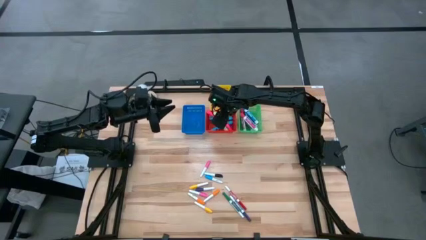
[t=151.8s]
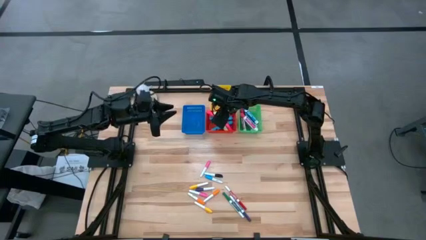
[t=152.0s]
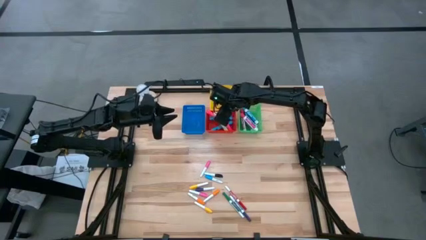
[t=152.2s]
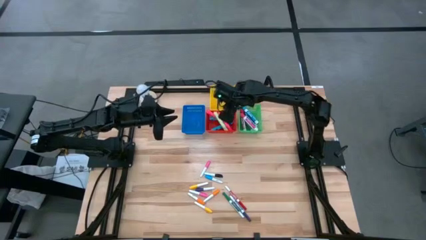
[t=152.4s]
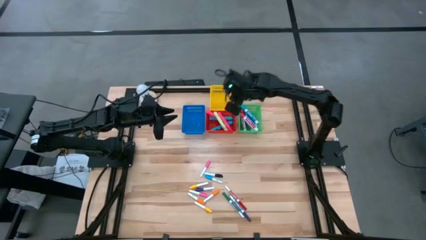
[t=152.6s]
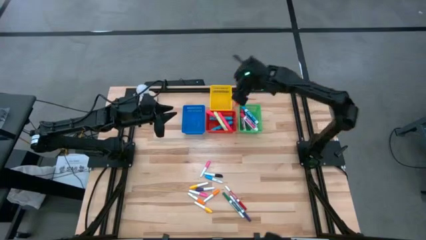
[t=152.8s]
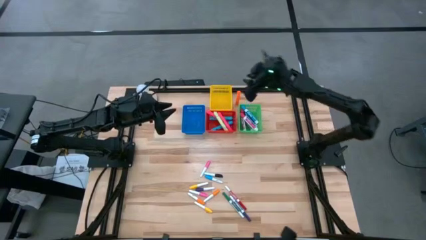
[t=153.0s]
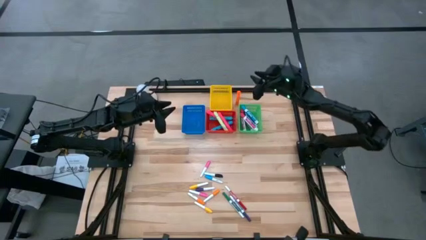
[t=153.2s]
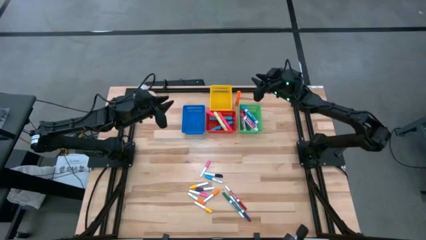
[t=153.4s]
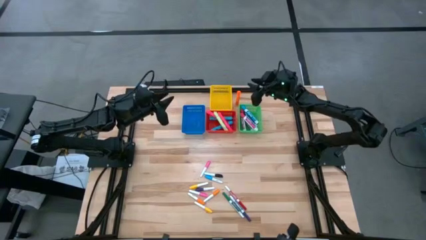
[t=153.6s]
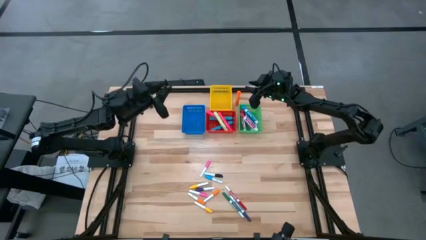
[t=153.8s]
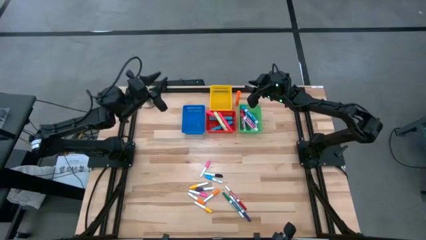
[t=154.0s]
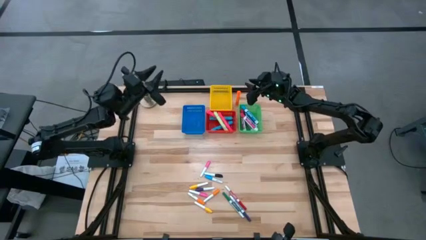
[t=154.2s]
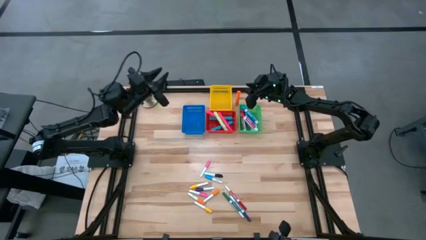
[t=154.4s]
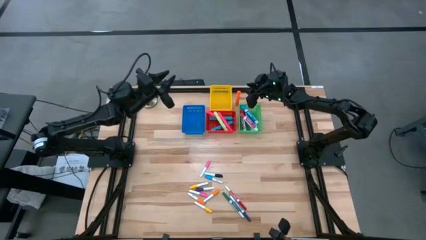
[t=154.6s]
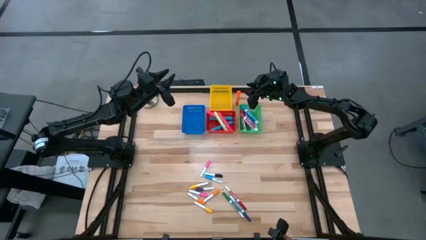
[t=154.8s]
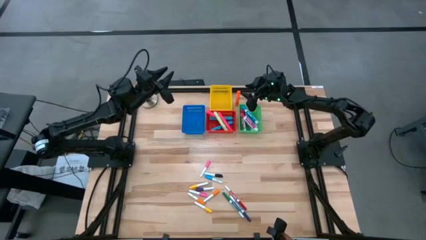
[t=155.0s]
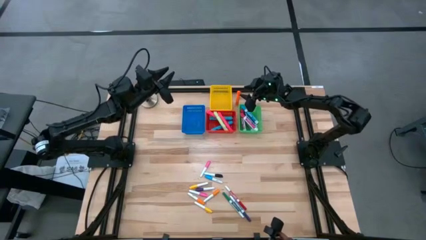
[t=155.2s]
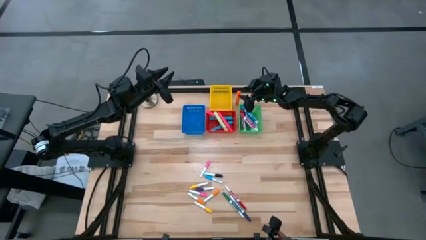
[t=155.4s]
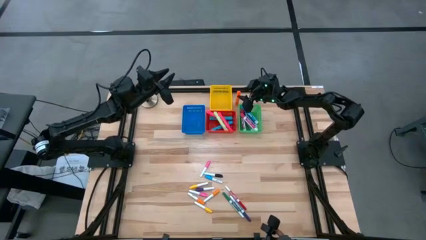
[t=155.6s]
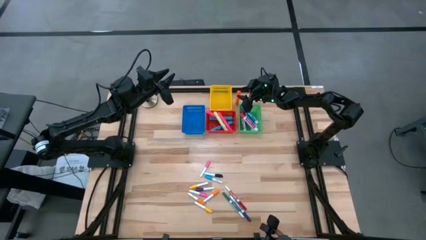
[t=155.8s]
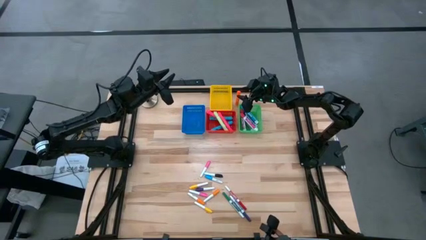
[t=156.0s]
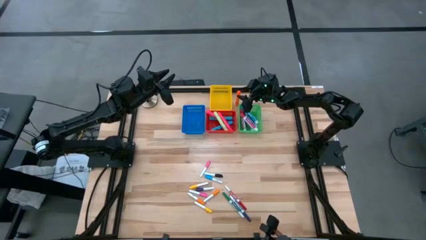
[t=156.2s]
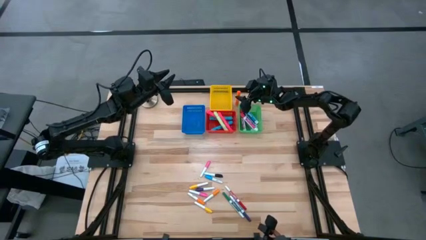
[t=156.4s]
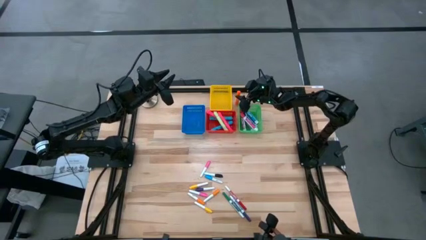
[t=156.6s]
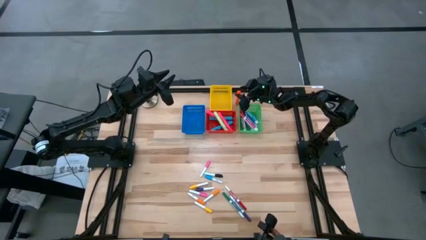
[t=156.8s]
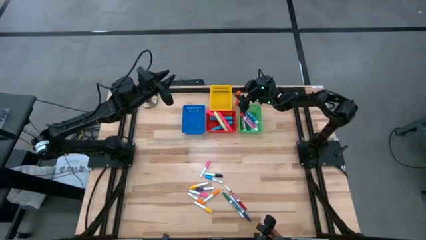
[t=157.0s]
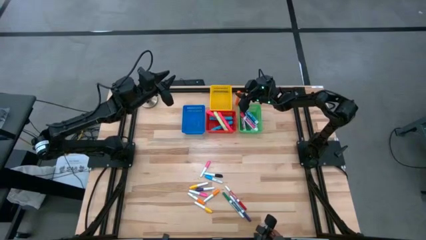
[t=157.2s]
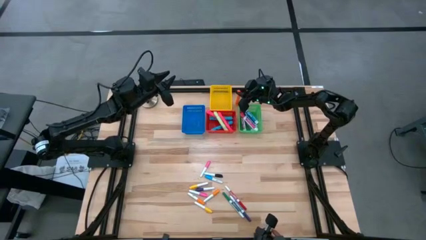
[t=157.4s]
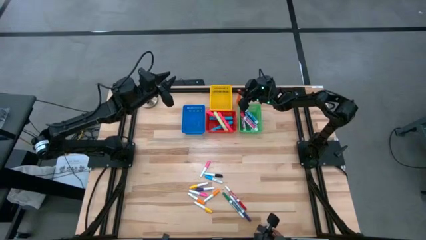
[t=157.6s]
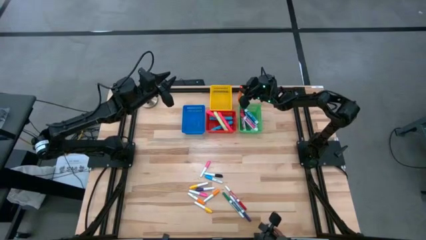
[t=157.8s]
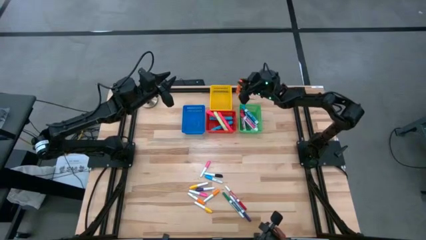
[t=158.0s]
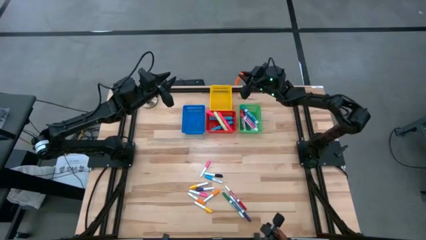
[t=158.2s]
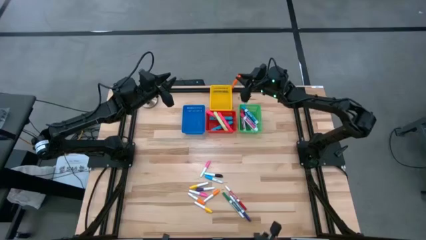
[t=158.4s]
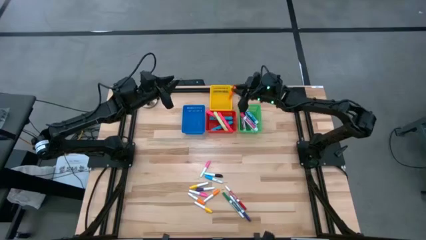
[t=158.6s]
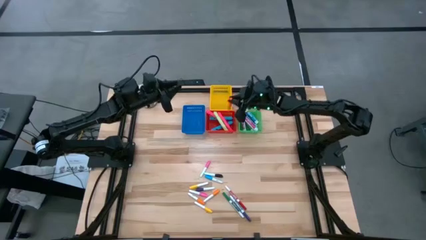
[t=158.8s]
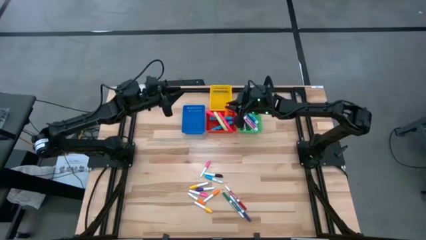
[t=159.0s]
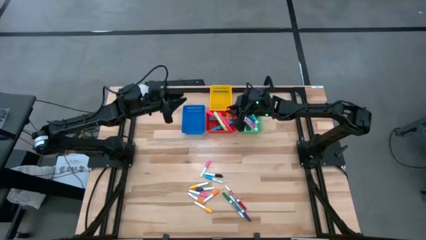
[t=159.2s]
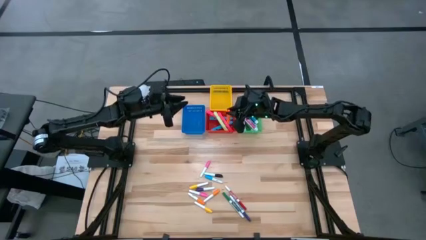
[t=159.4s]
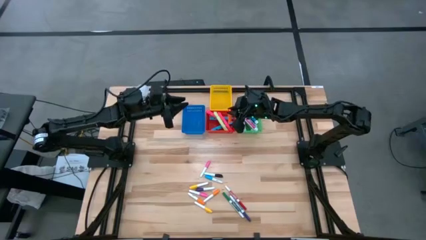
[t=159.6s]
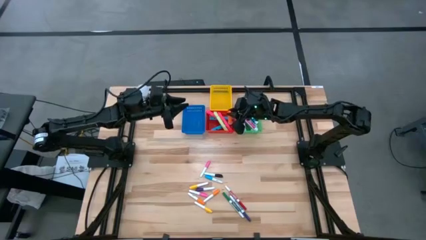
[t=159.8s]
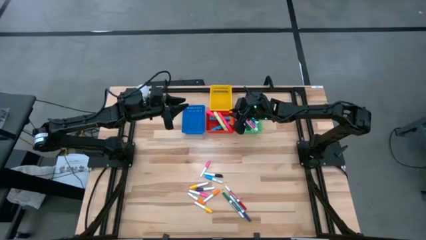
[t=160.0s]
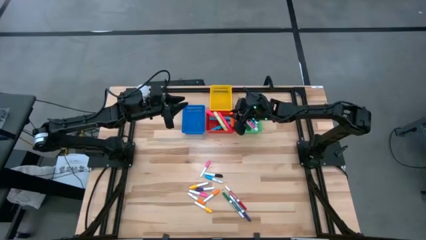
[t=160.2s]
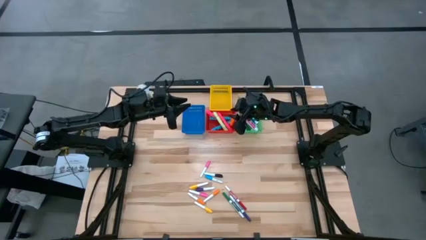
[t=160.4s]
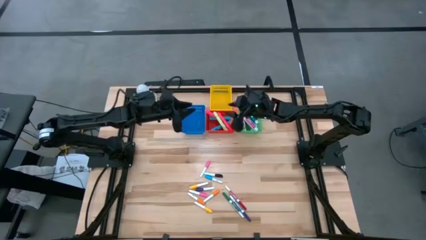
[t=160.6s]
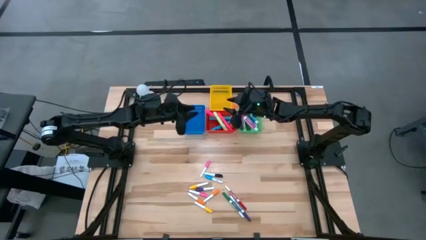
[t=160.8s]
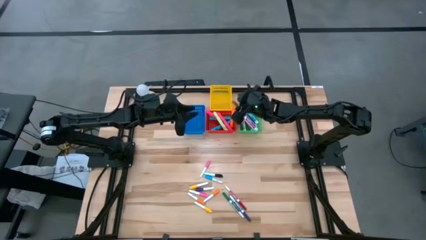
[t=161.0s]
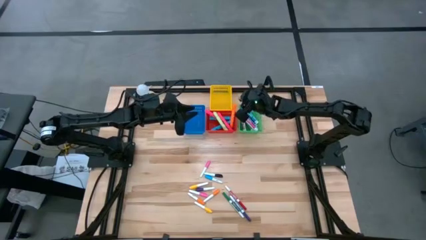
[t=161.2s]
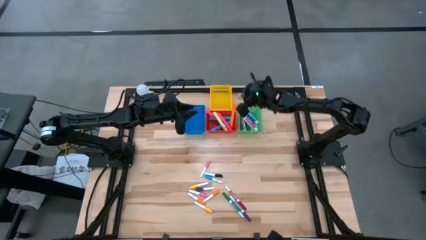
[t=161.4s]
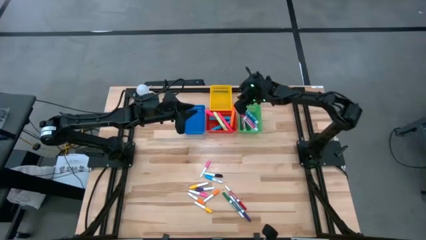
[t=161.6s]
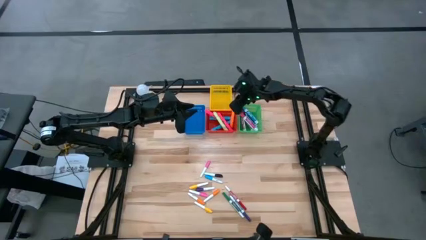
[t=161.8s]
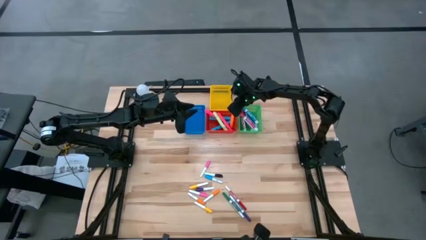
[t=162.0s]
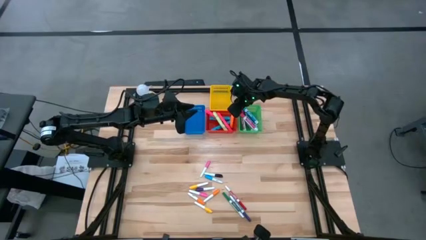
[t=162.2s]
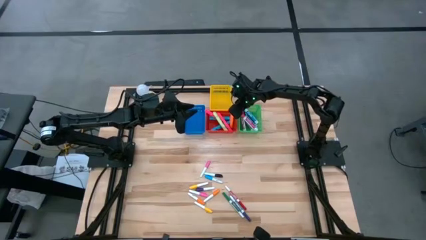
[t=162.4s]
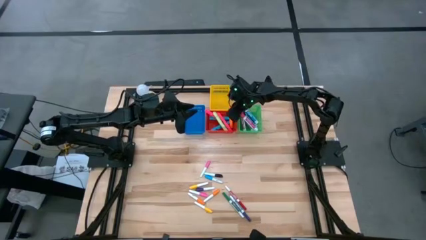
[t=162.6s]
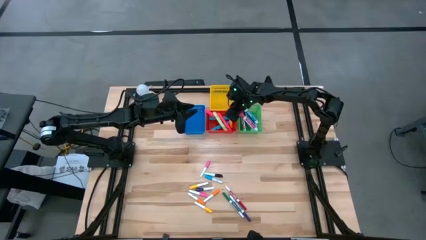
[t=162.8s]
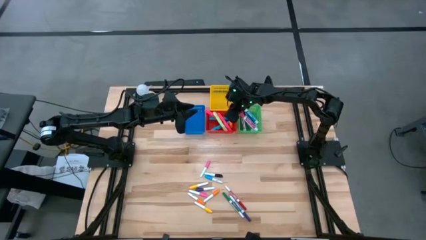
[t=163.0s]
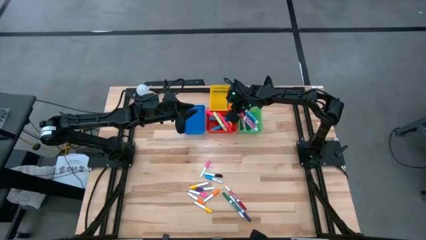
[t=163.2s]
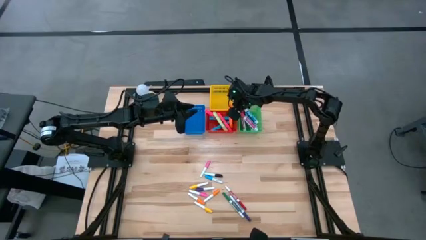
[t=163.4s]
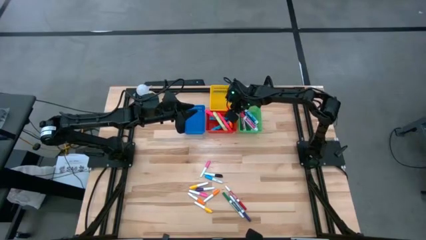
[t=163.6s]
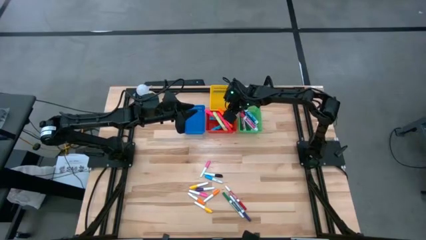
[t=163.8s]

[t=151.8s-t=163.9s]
Task: Pick & Place Markers
Put the large orange highlighter pen into the red bin

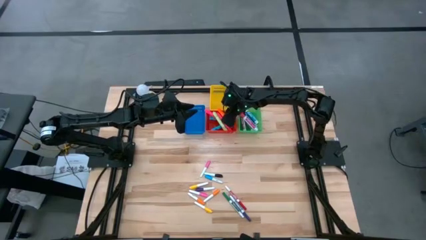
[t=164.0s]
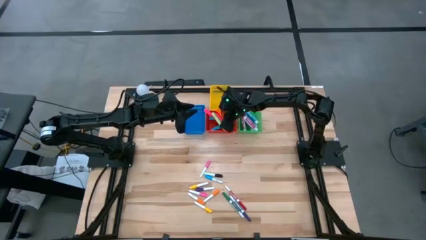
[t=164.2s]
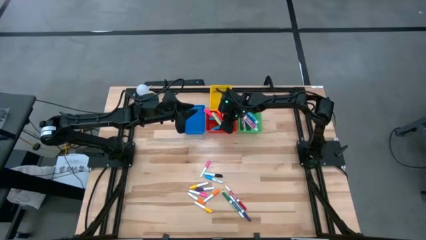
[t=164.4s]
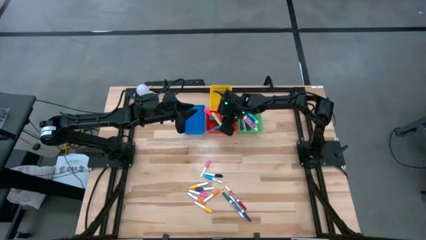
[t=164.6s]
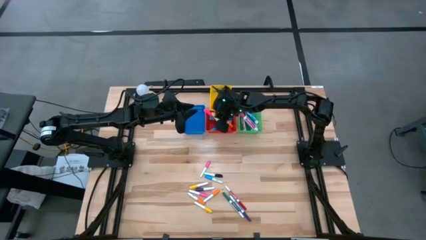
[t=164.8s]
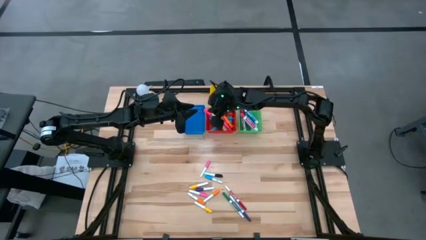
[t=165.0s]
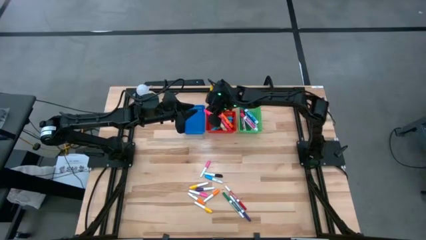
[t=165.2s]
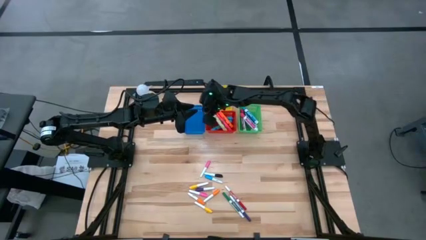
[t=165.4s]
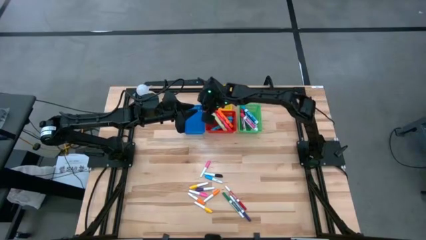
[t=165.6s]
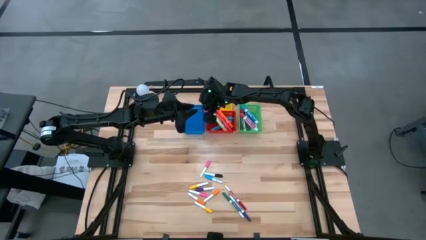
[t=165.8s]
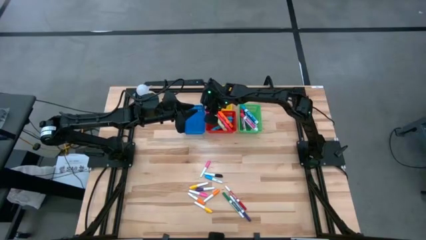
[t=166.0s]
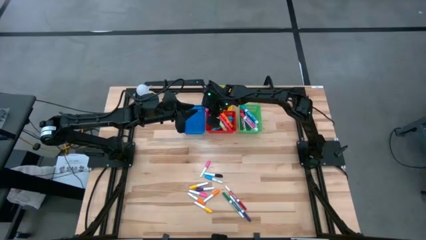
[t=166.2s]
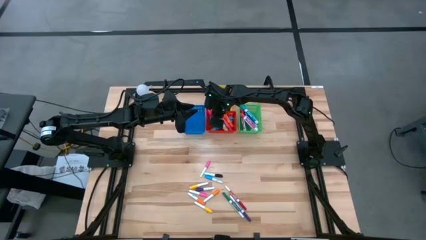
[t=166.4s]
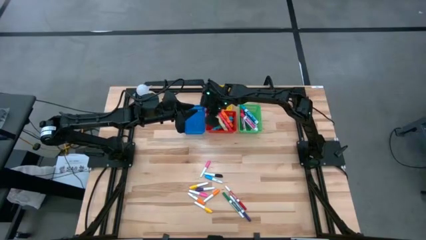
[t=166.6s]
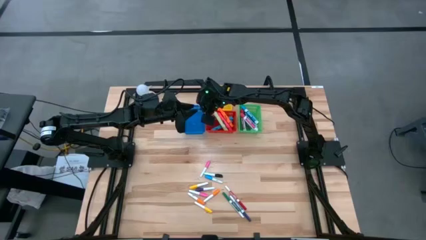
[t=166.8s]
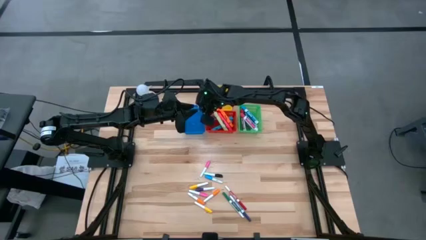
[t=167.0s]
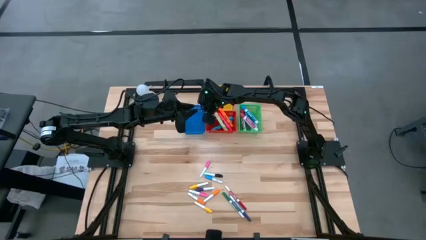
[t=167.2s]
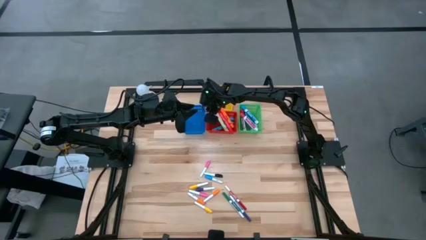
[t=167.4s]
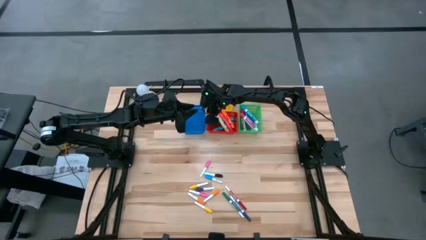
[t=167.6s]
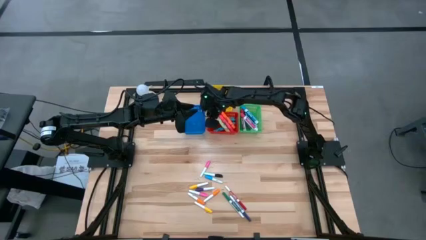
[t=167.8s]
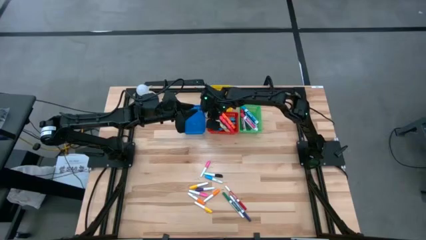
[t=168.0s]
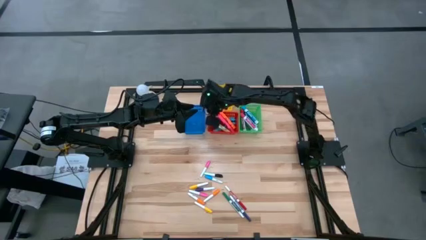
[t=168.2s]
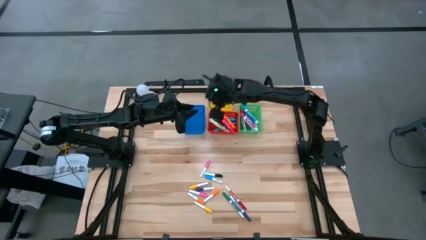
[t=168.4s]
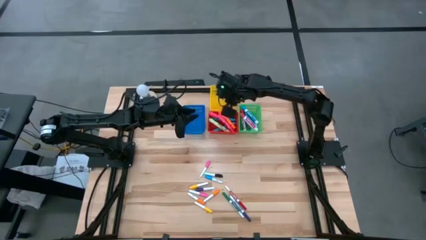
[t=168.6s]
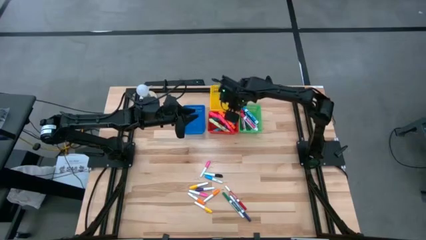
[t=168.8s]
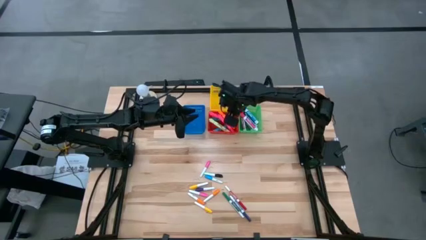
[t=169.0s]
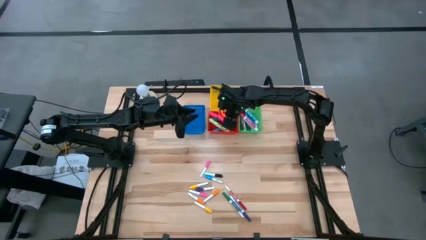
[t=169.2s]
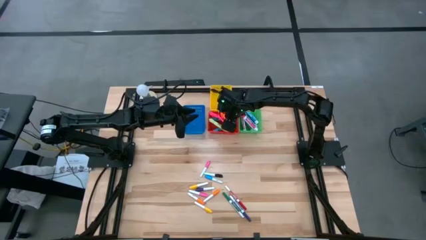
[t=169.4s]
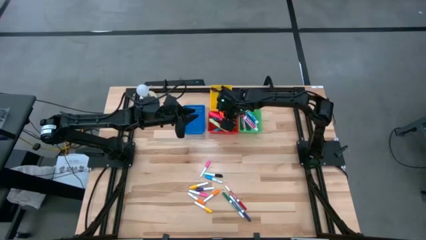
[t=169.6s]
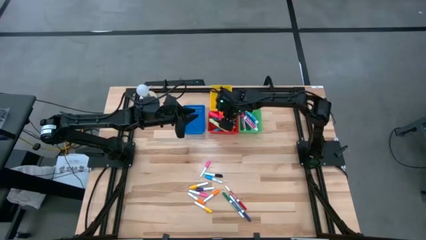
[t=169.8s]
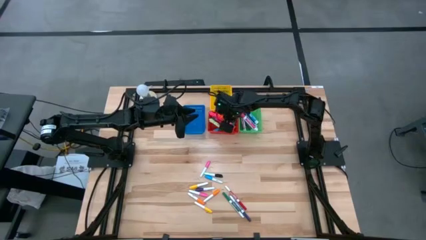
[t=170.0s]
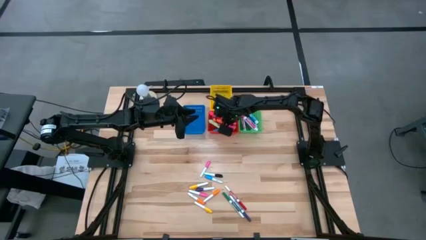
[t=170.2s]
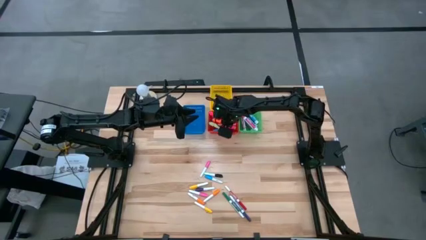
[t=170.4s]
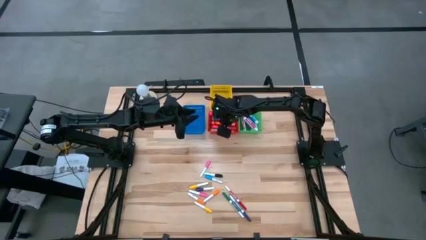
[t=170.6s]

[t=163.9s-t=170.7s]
Adjust the large highlighter pens in the red bin
